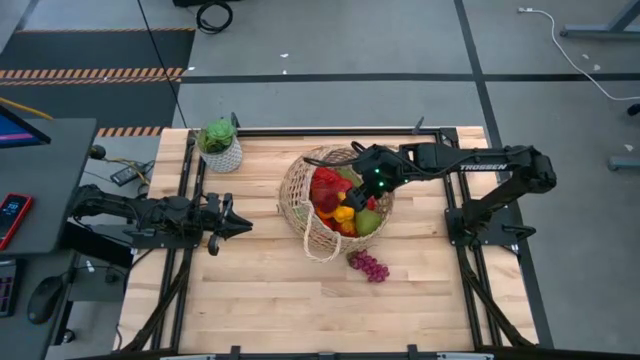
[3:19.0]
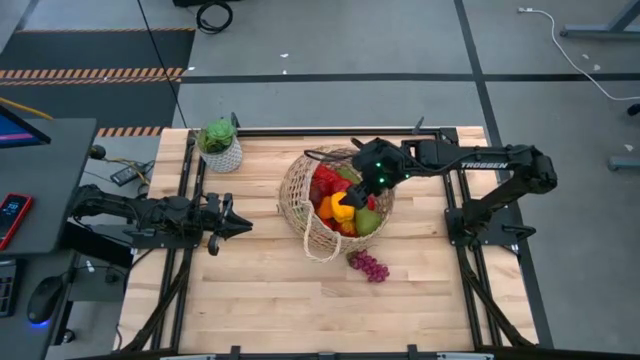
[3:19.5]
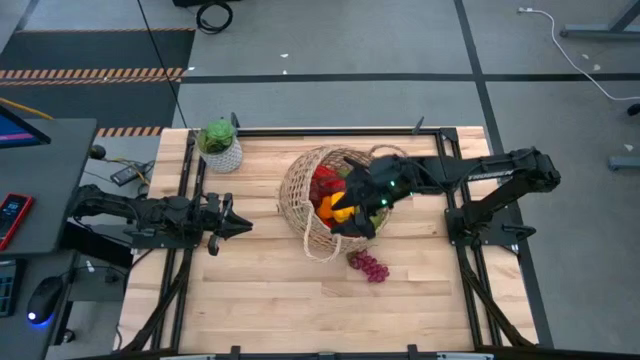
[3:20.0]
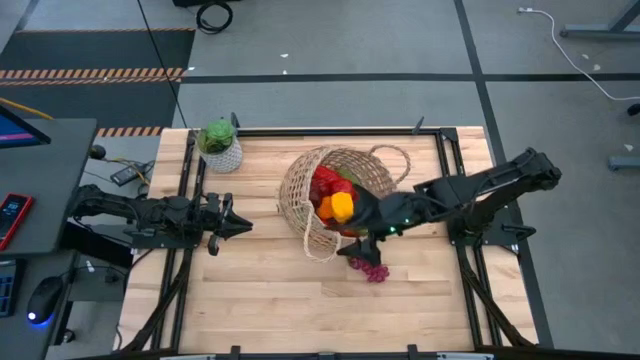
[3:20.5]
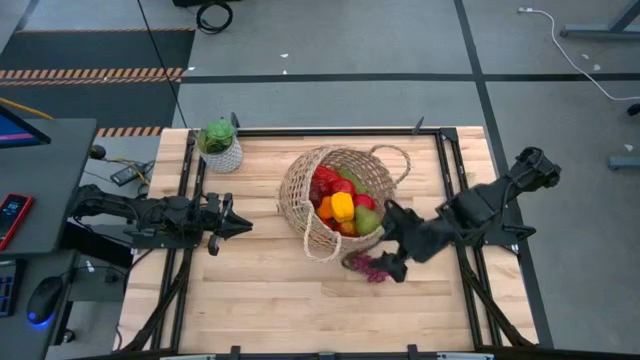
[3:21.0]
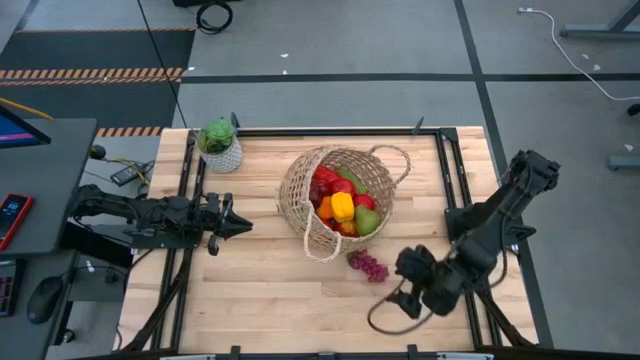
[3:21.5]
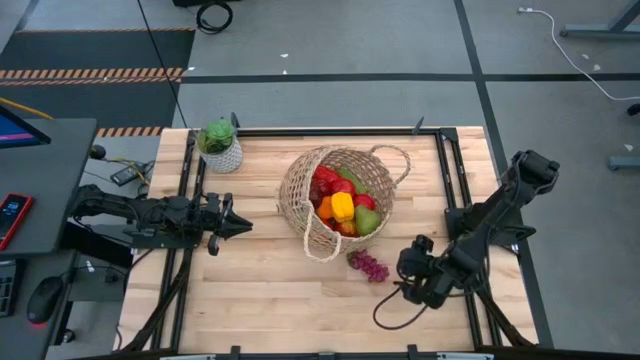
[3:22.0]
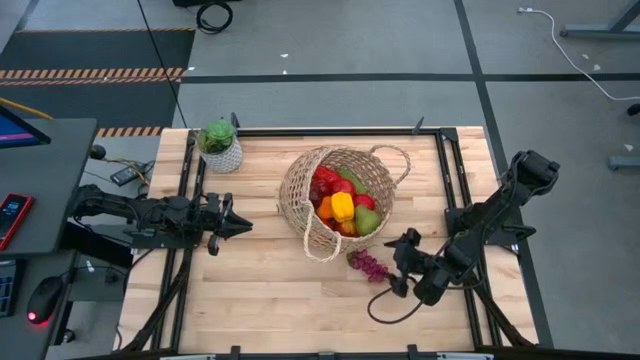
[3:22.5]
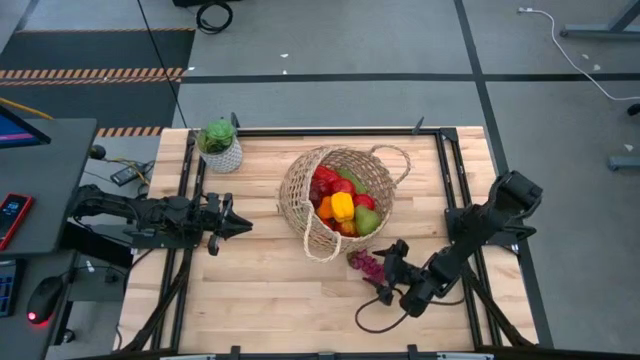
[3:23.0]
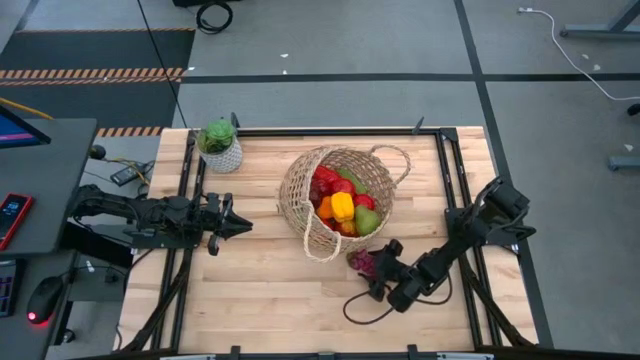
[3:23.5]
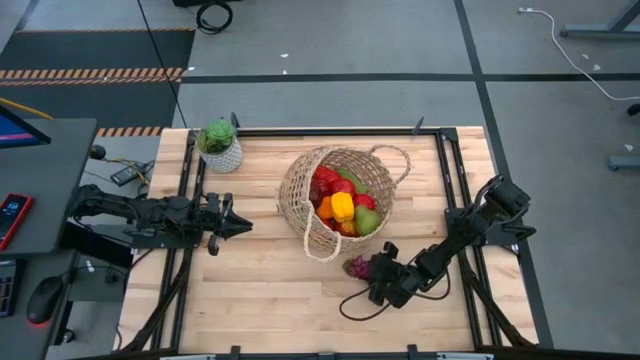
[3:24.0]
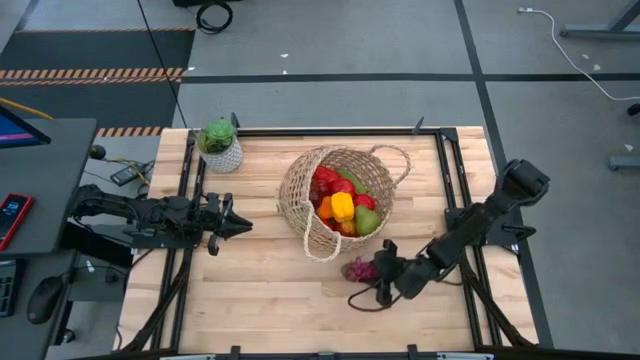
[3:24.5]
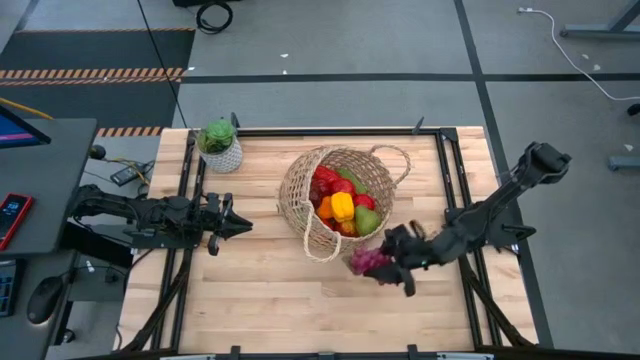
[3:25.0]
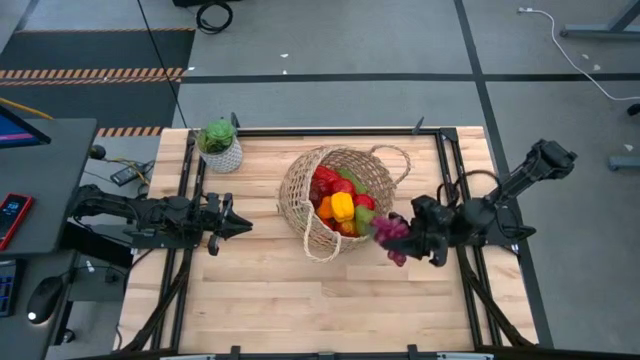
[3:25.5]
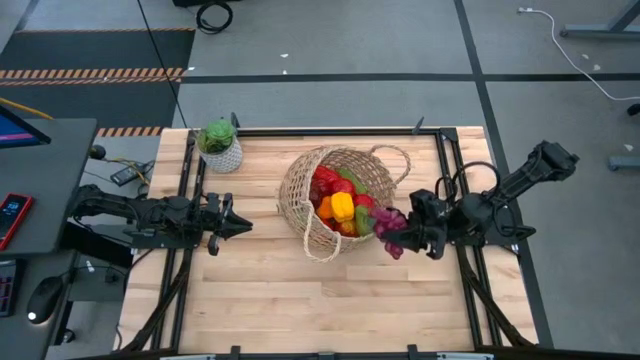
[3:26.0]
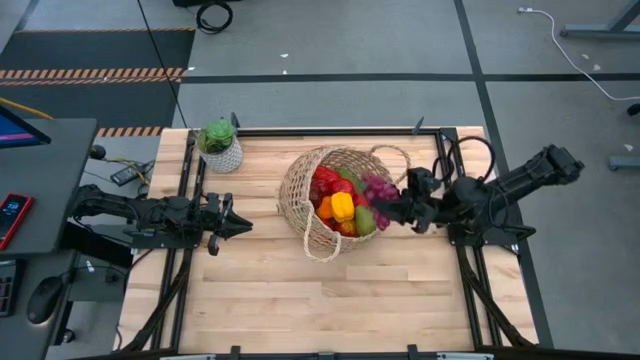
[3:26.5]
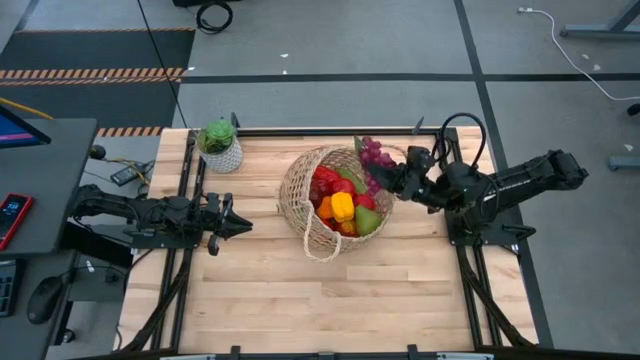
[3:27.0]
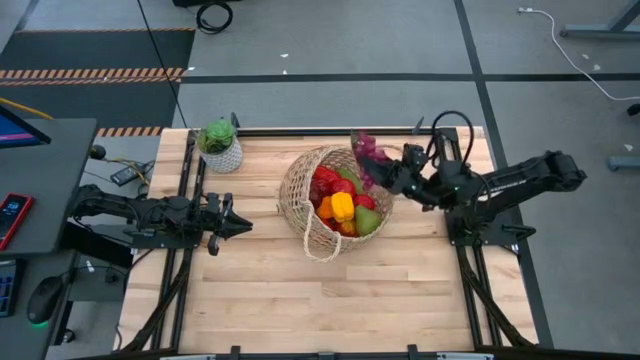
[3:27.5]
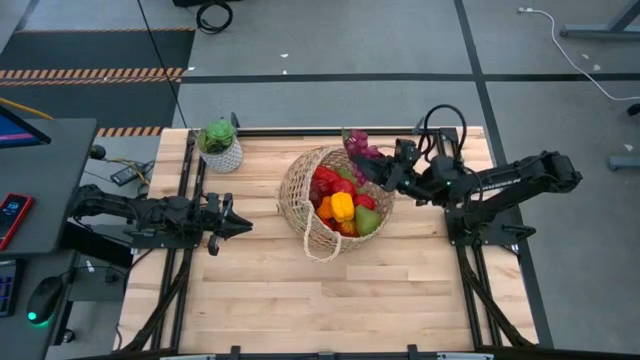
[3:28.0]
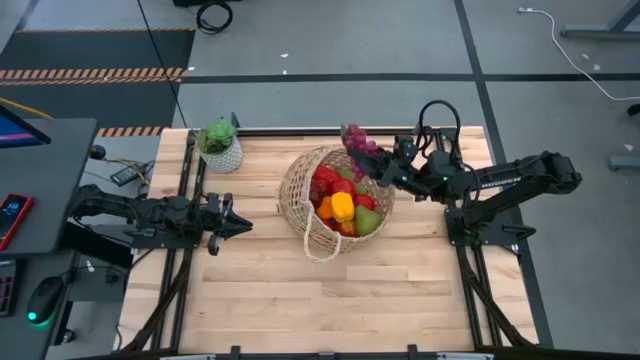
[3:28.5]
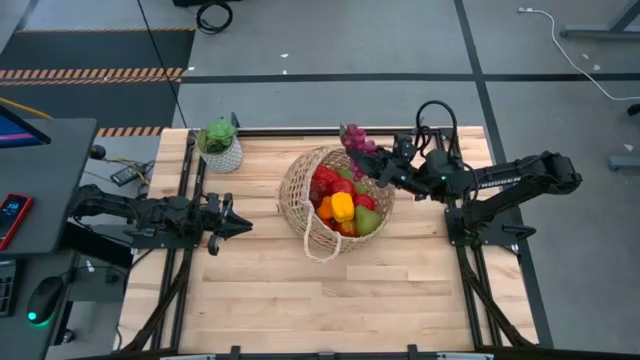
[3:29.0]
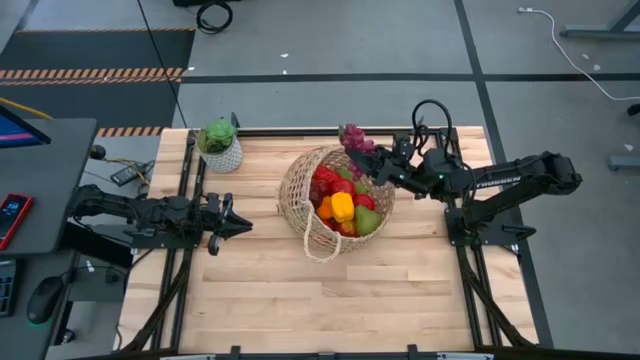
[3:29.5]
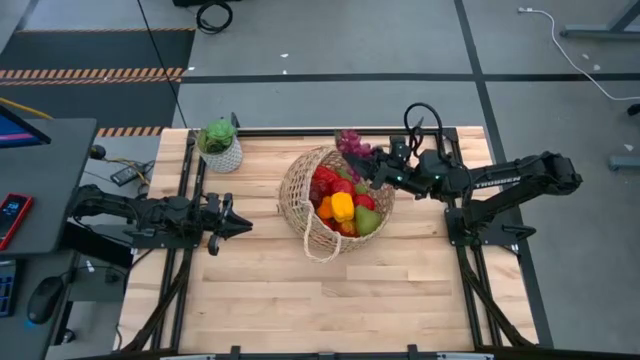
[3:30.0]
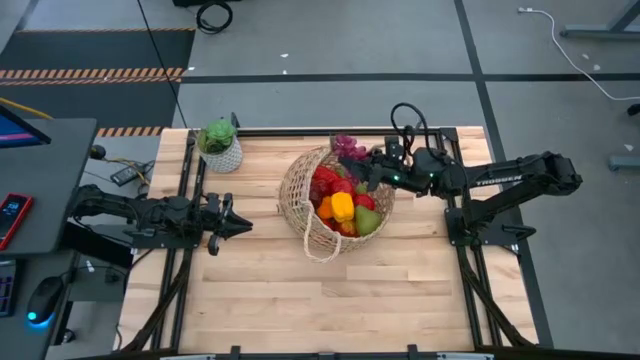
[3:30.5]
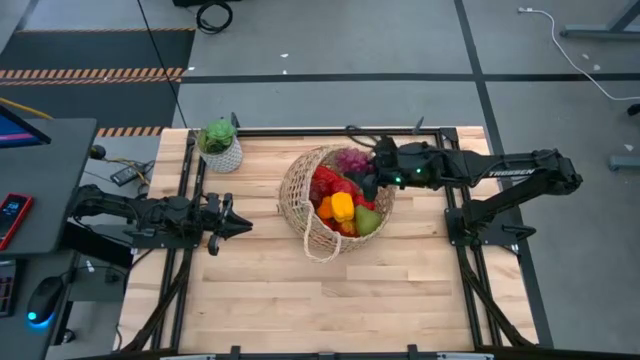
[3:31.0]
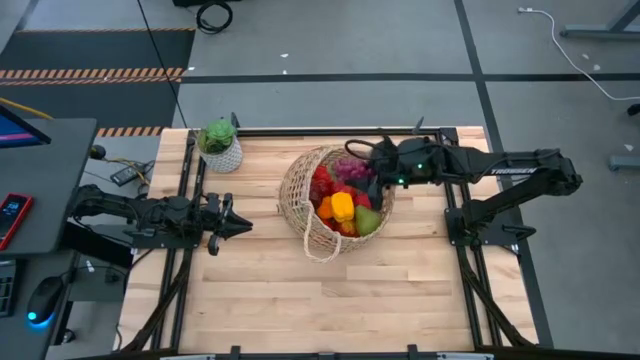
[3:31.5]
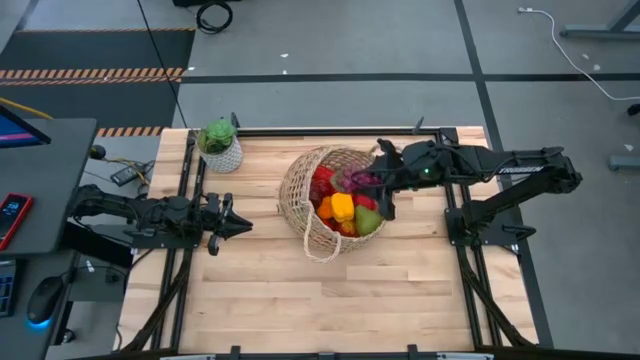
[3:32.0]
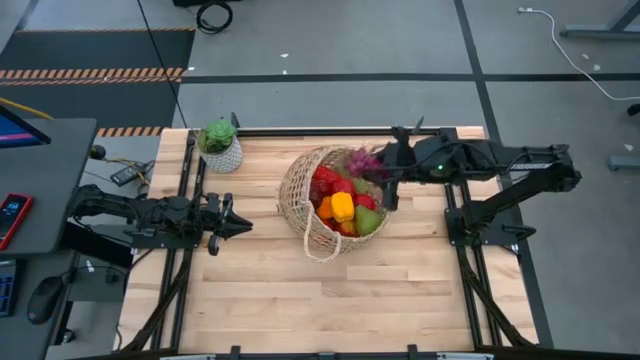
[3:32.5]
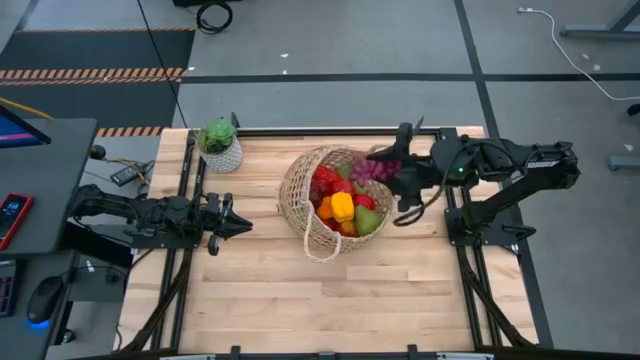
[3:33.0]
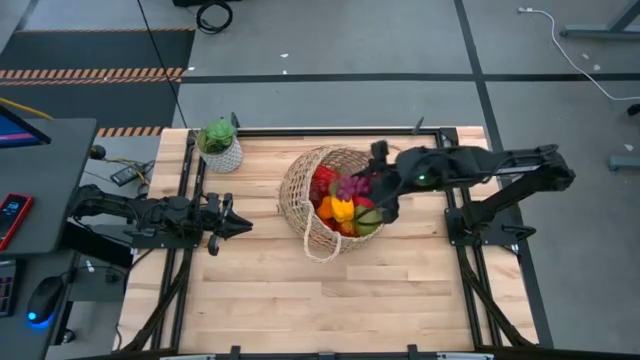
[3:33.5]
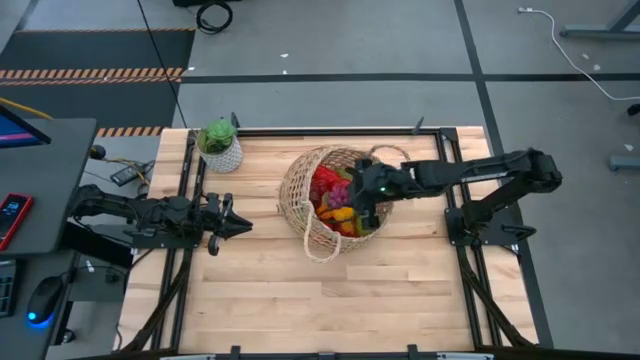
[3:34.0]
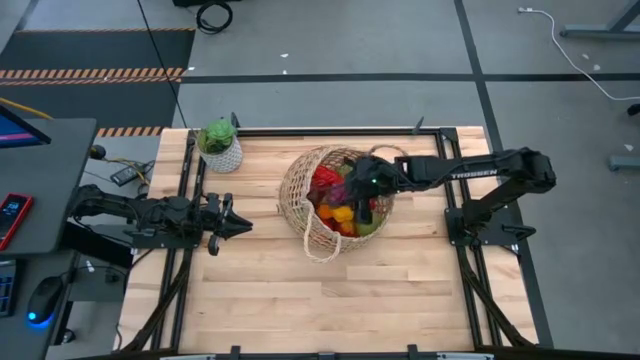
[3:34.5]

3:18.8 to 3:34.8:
Task: Build produce basket
Put the violet grapes into the woven basket

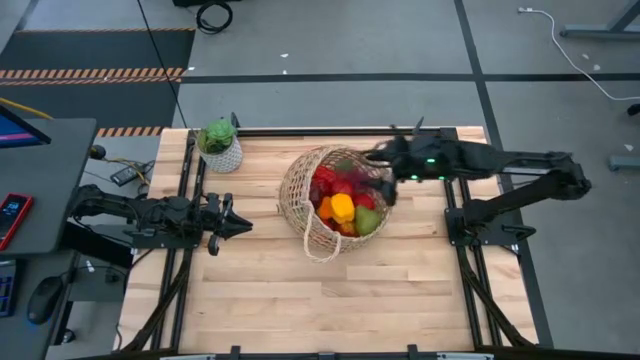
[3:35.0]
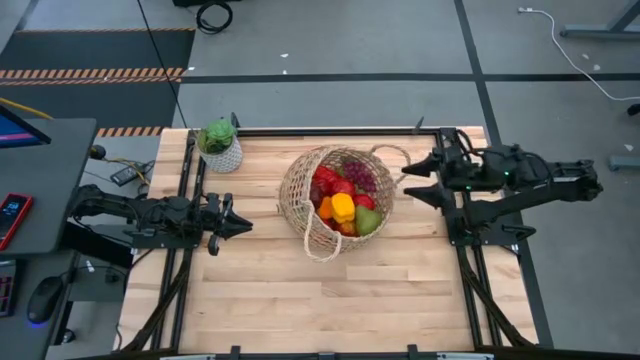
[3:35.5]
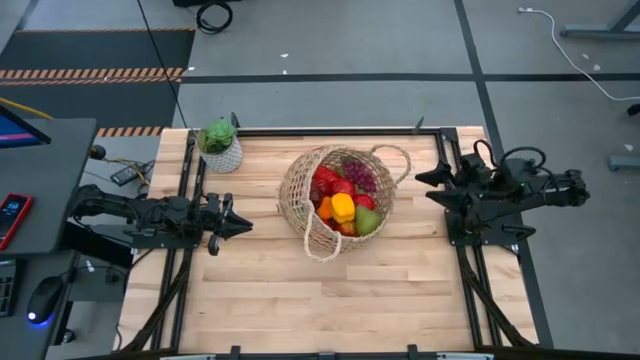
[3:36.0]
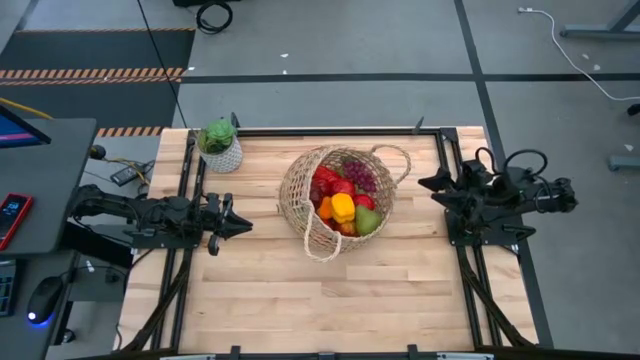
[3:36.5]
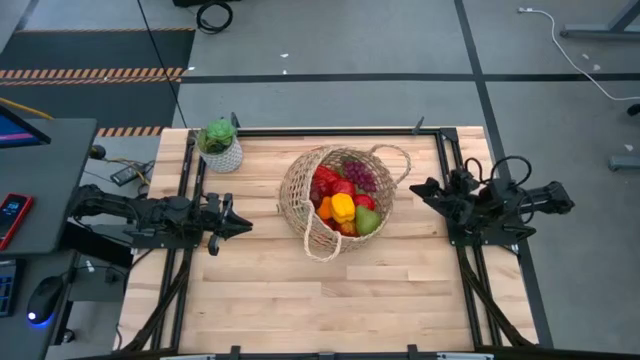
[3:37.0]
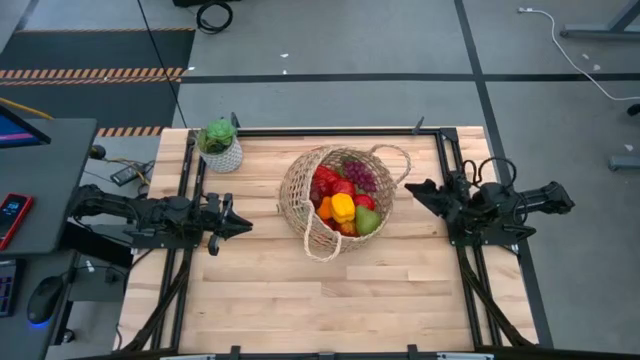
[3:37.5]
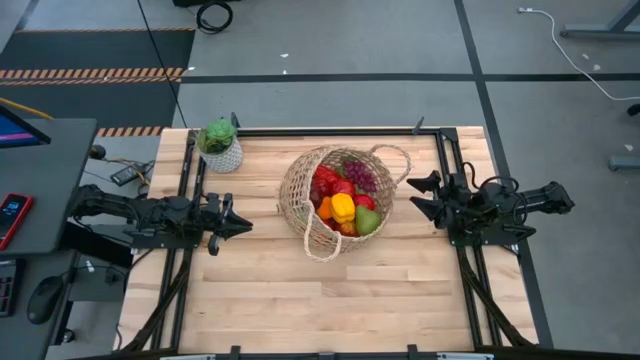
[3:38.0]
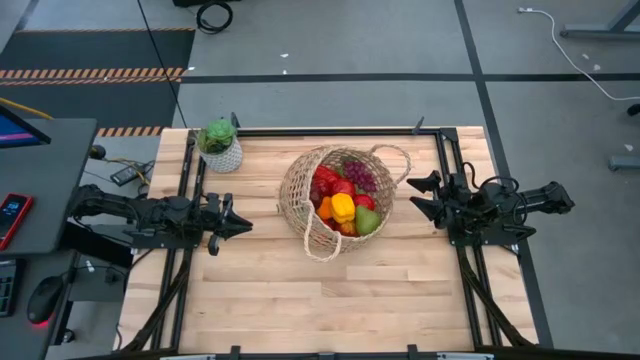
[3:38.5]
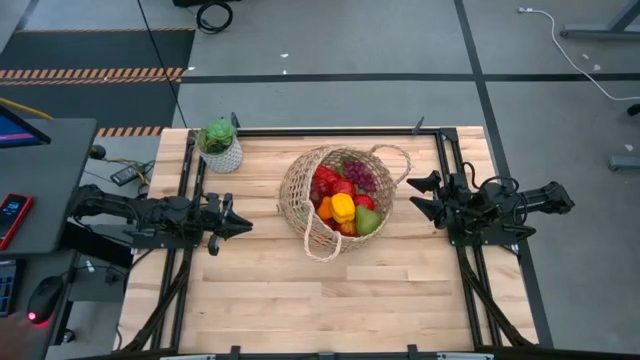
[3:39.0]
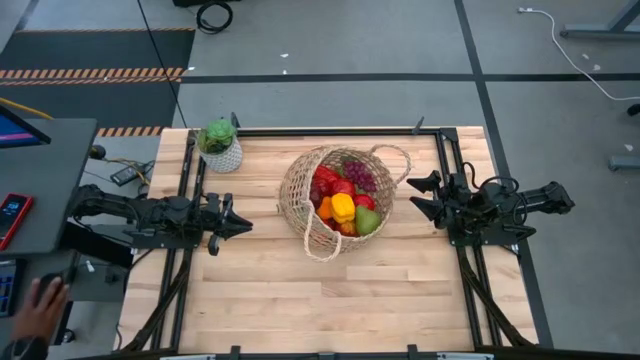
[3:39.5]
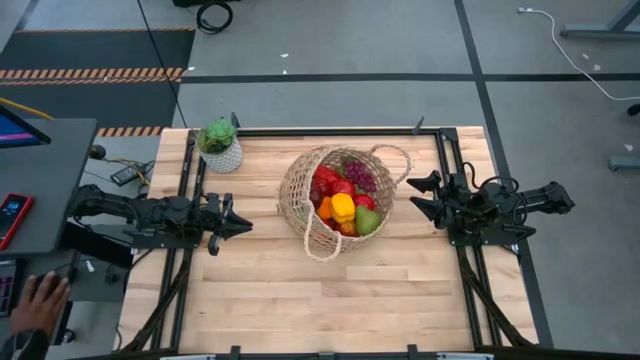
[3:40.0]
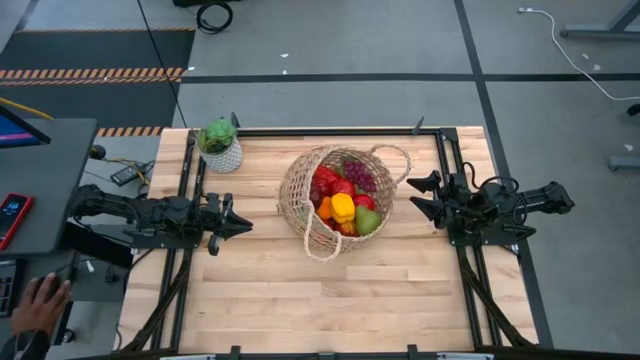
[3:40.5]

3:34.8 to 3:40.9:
Return to Home Position
